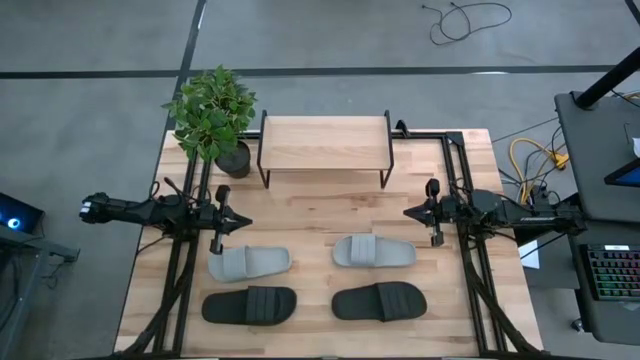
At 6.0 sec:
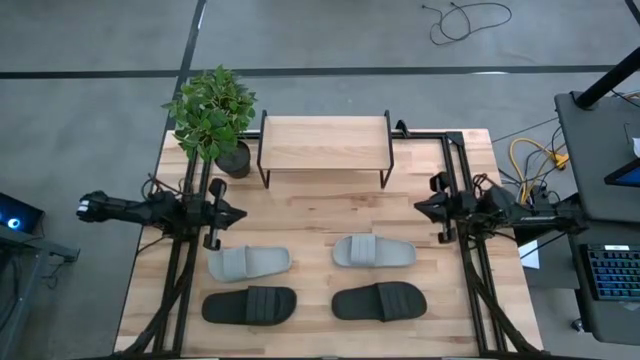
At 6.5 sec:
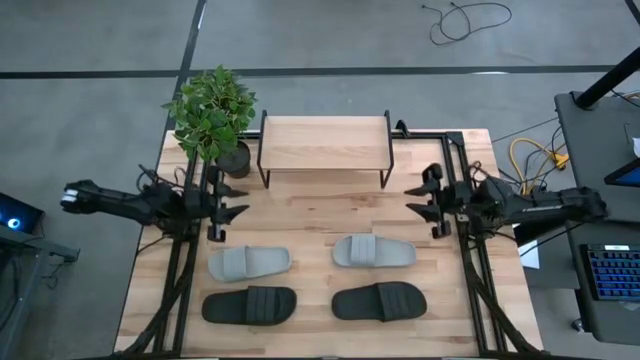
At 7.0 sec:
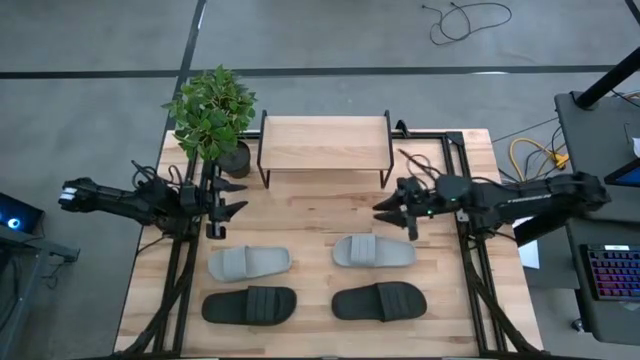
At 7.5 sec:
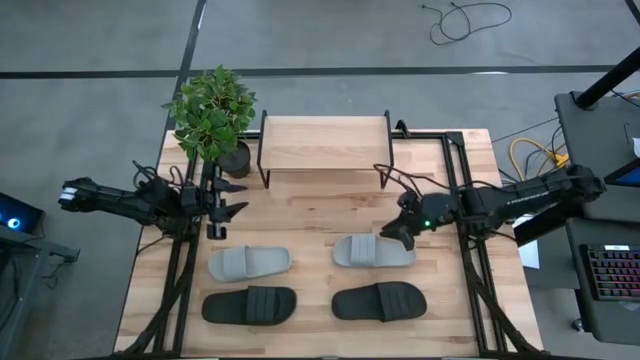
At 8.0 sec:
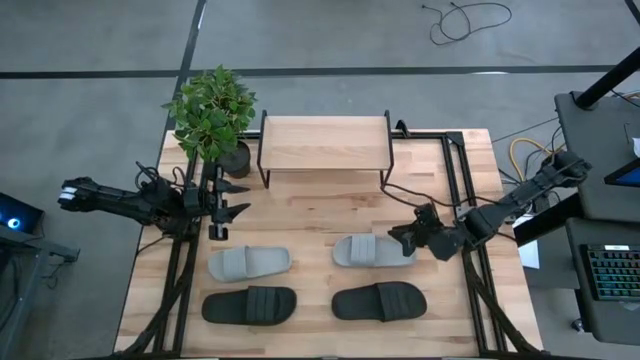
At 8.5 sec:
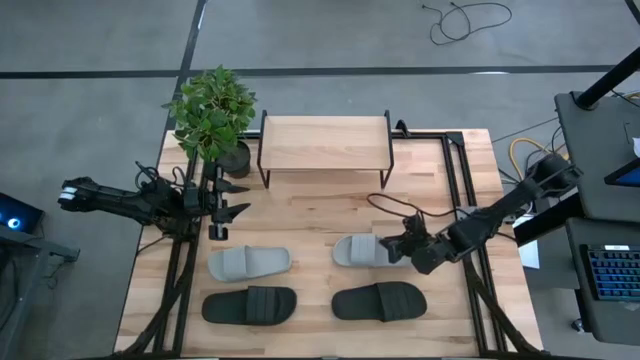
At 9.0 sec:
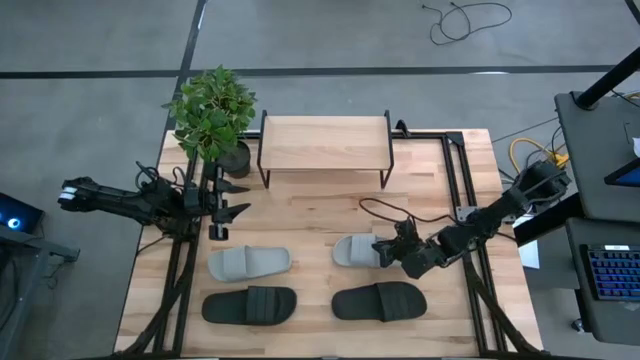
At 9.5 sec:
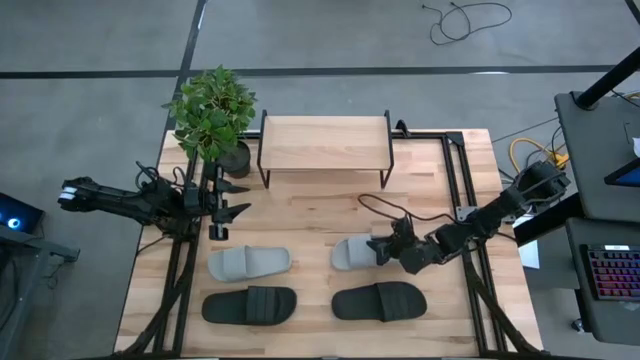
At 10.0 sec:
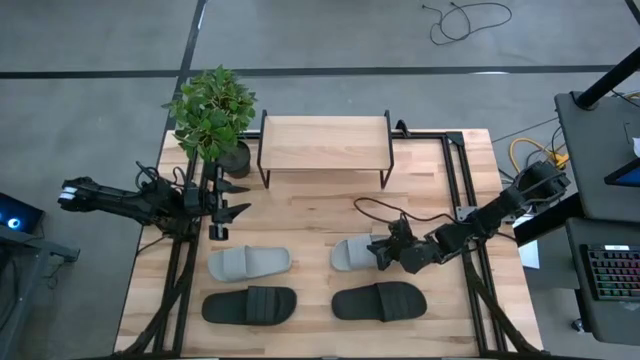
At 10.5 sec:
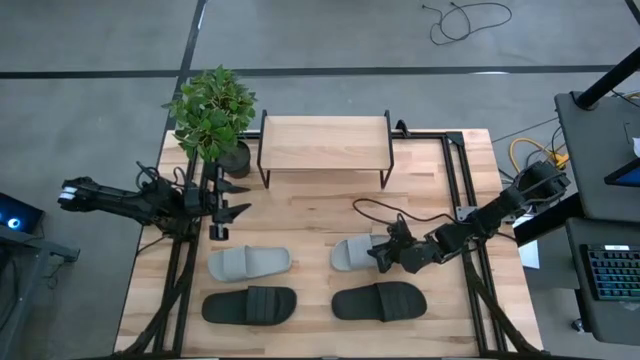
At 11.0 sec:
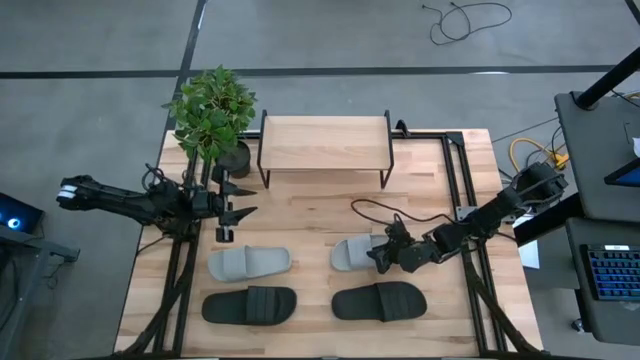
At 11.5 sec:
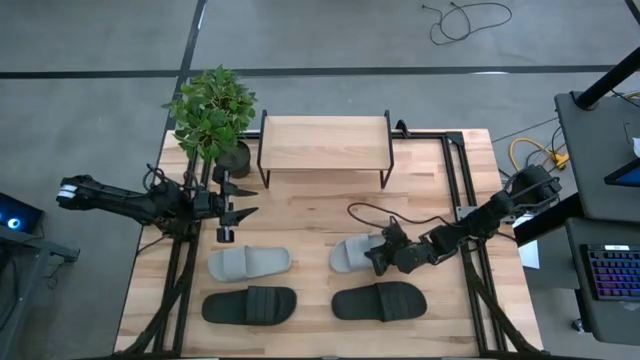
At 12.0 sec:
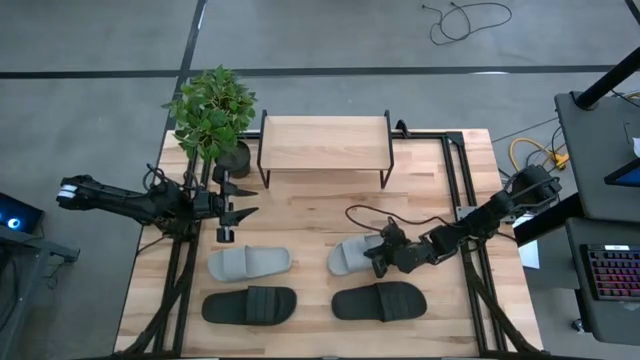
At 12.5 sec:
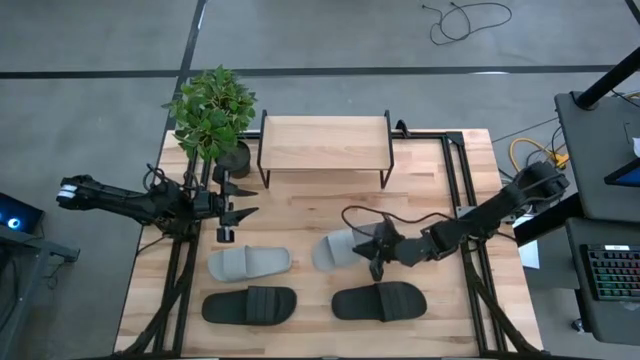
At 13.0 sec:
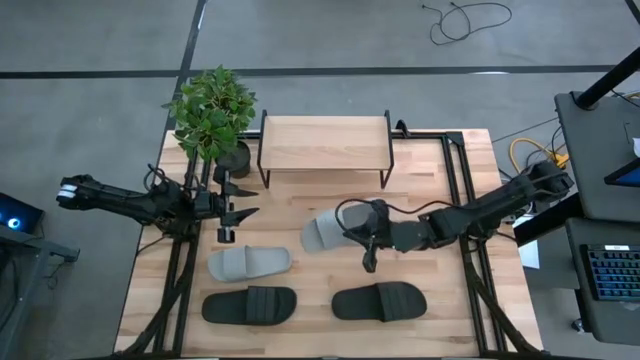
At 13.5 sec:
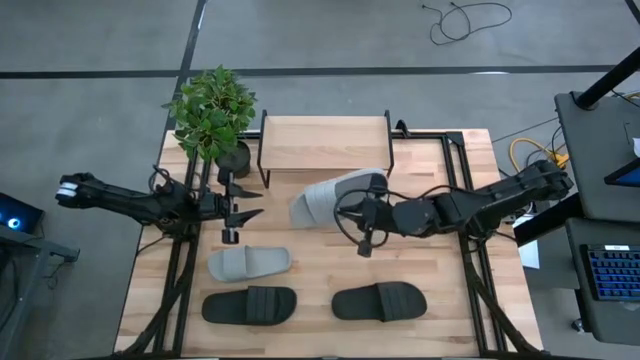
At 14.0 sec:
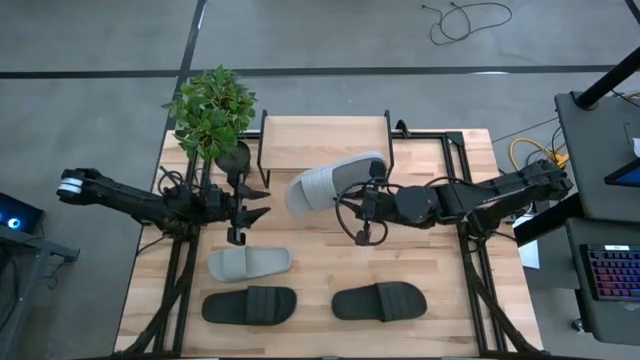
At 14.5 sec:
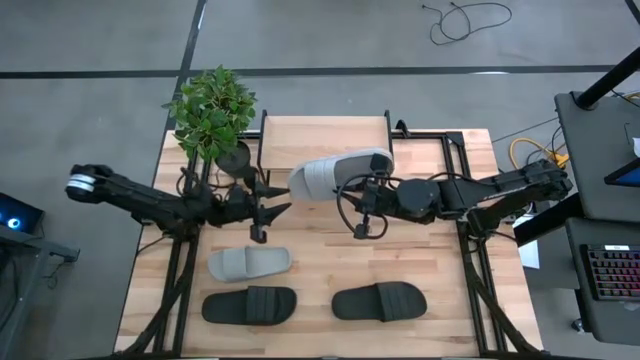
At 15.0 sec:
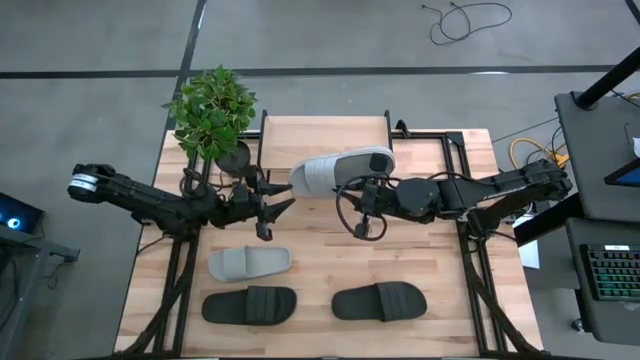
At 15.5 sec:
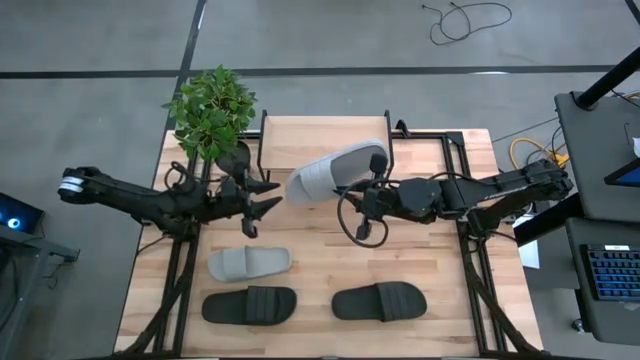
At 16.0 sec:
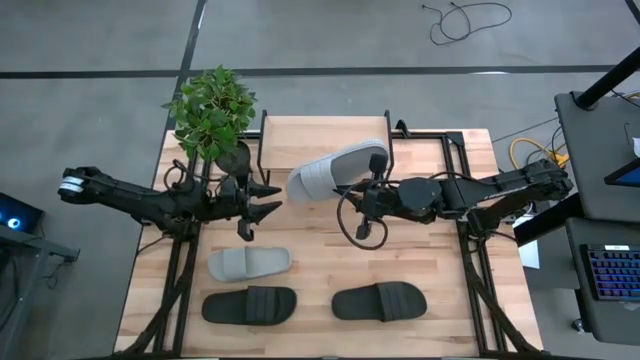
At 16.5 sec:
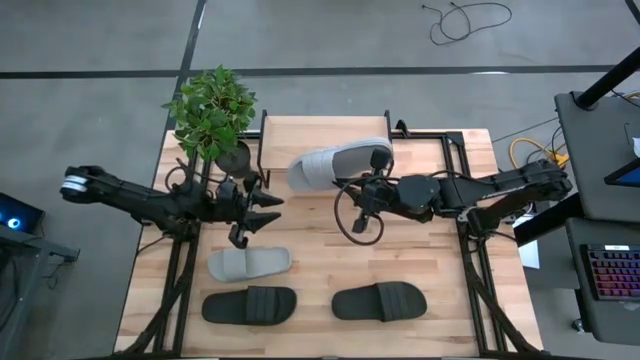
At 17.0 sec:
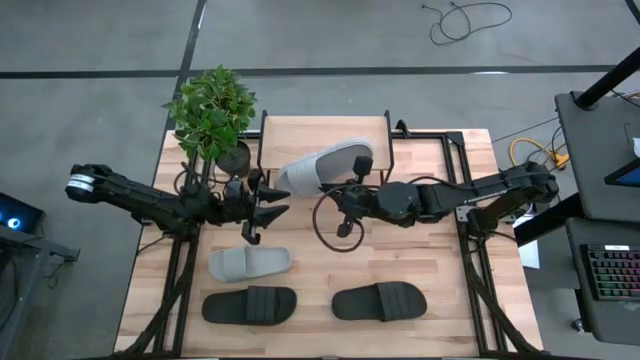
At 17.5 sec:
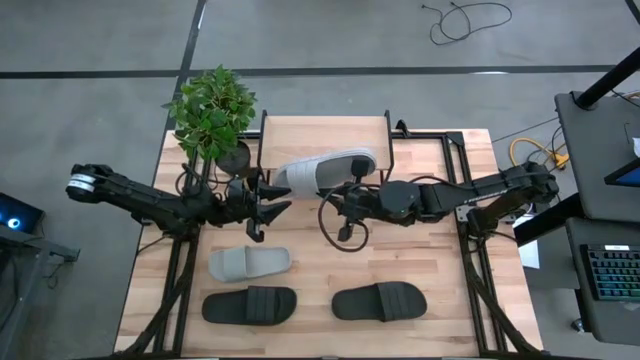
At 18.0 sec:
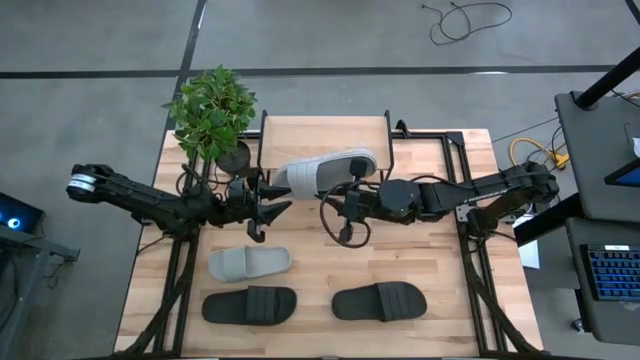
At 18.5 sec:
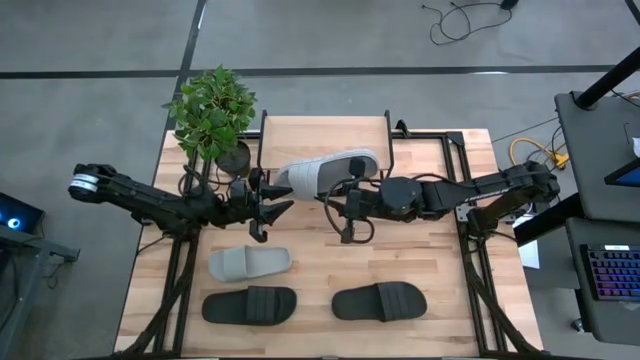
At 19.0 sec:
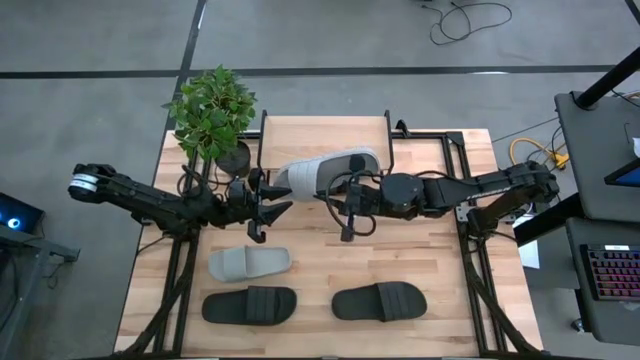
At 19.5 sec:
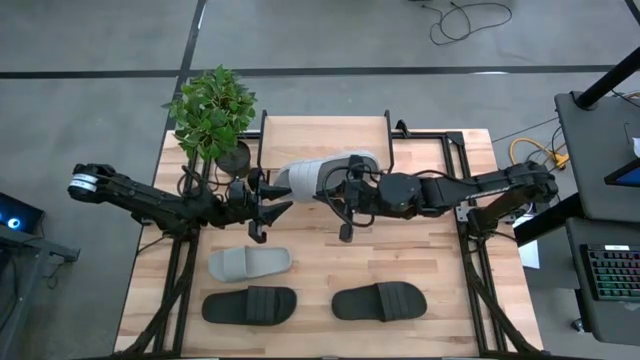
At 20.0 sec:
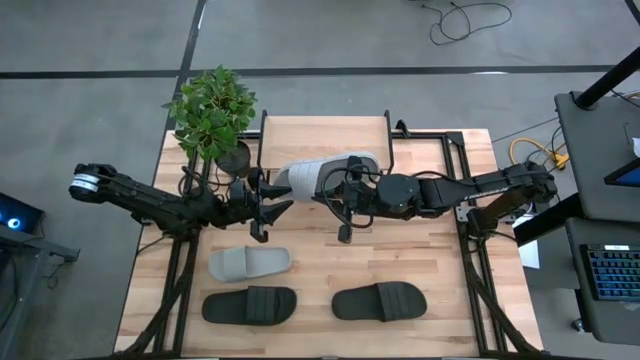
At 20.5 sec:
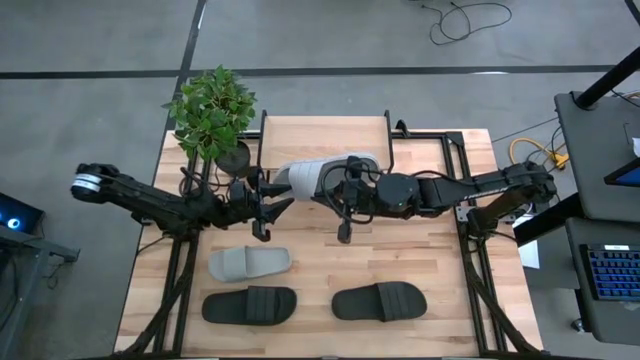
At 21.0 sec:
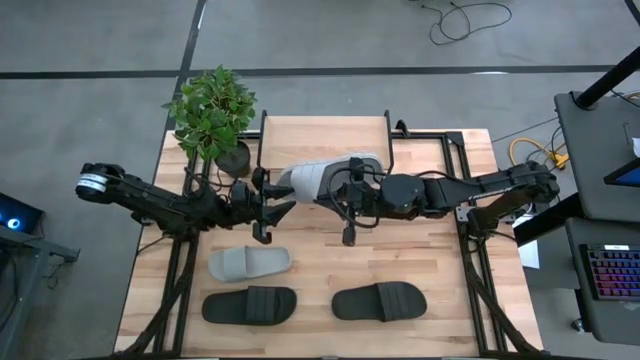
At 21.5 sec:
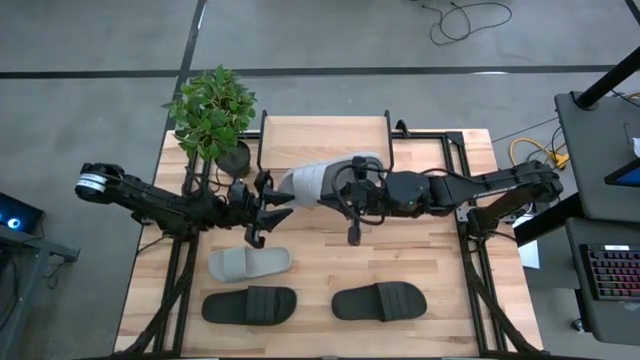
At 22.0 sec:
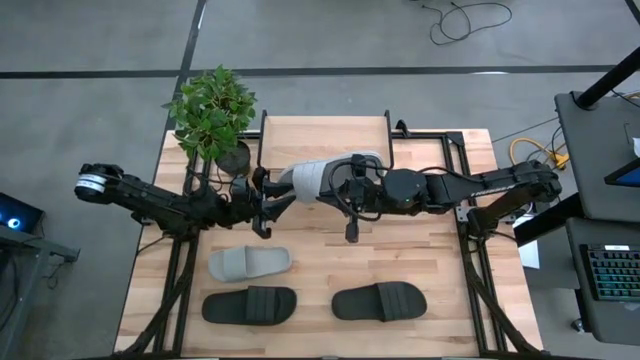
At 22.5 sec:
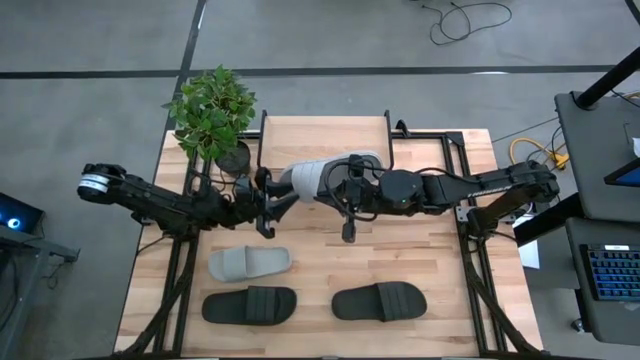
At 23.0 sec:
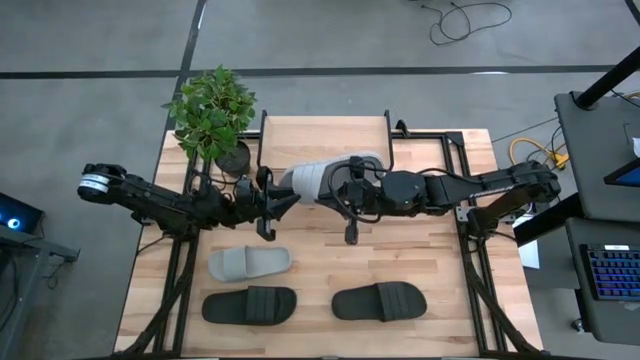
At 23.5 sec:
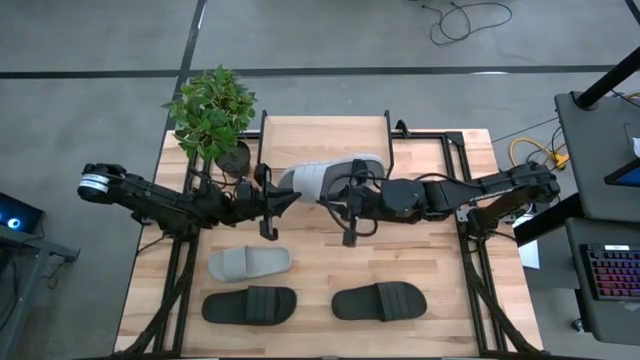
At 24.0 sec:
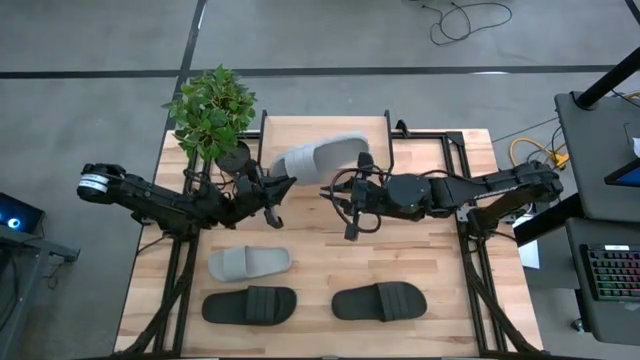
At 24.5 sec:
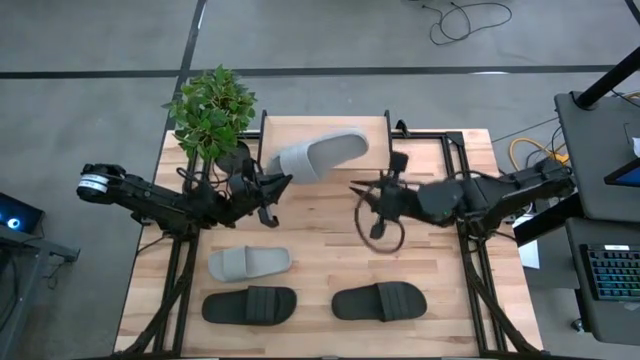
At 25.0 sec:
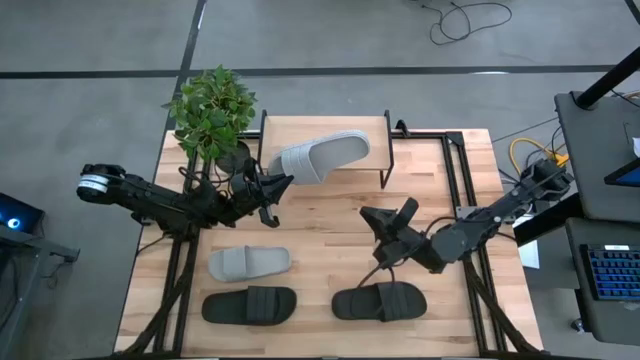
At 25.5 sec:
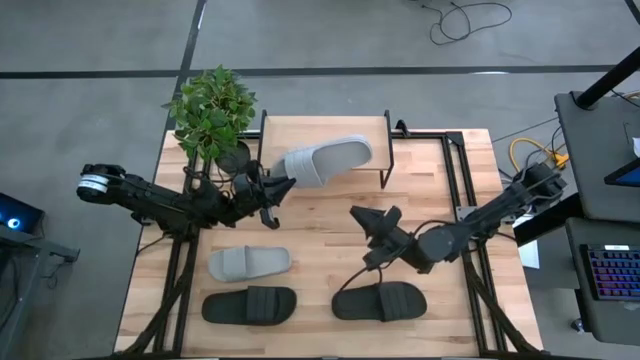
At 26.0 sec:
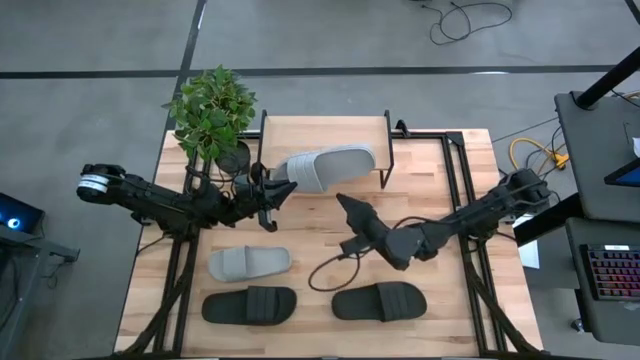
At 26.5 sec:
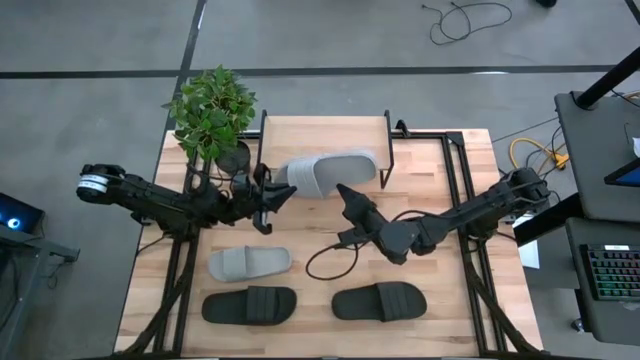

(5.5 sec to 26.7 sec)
Task: Pick and place slides into the shelf
Put the right grey slipper on the shelf
